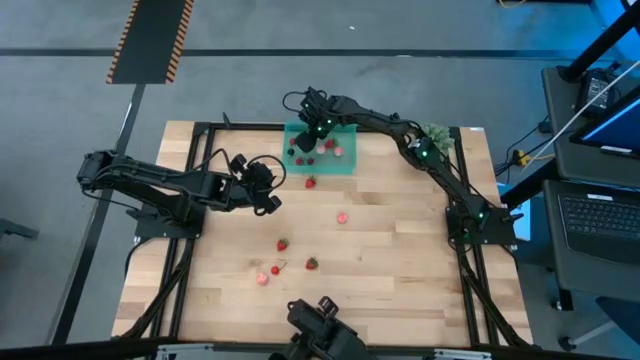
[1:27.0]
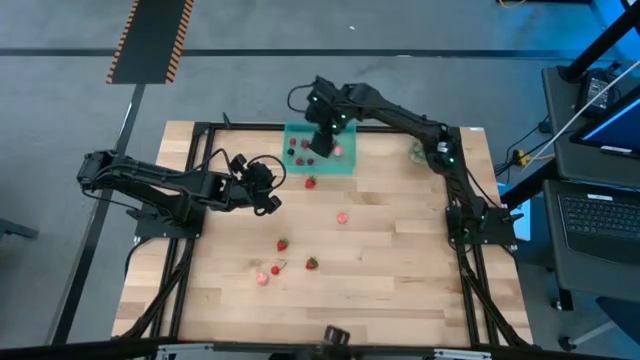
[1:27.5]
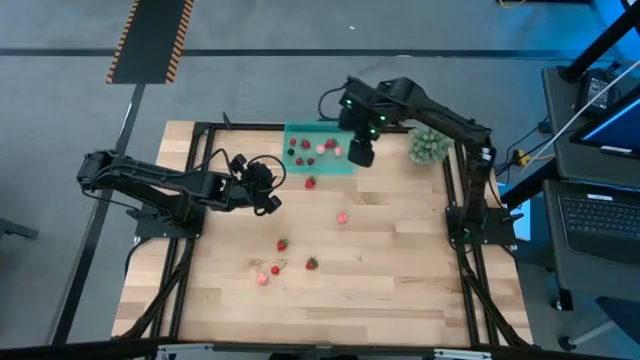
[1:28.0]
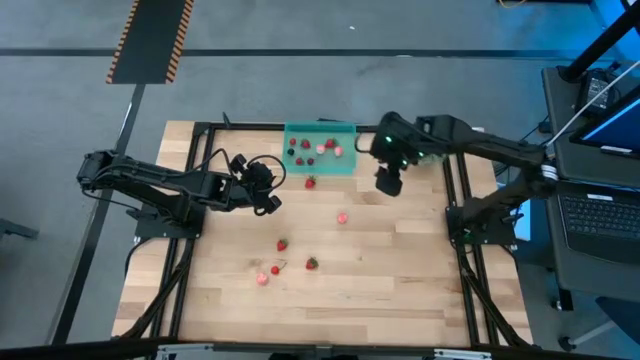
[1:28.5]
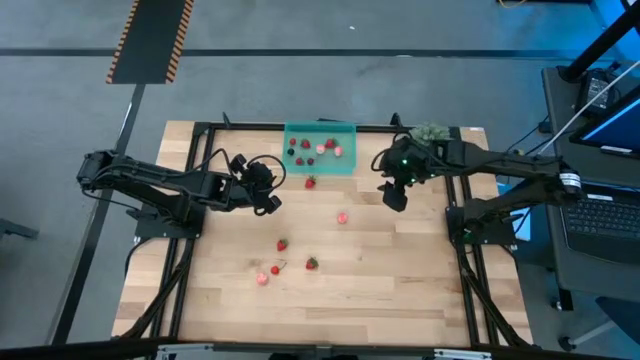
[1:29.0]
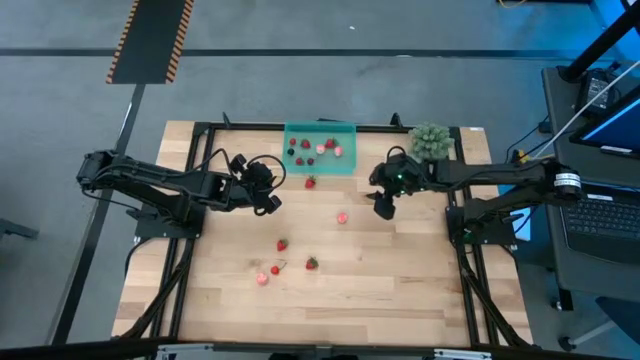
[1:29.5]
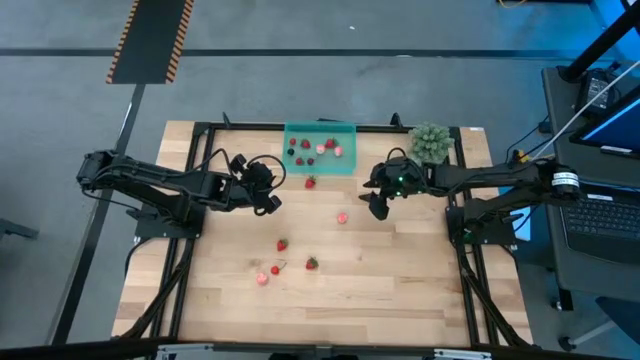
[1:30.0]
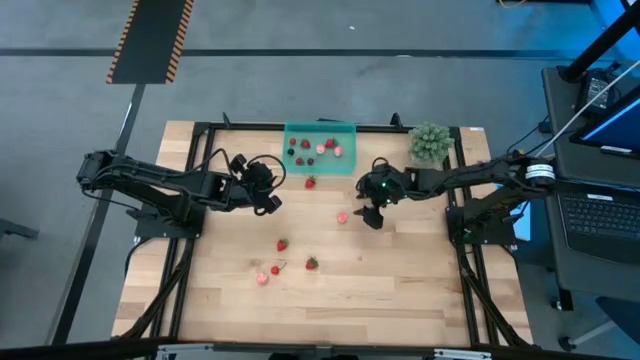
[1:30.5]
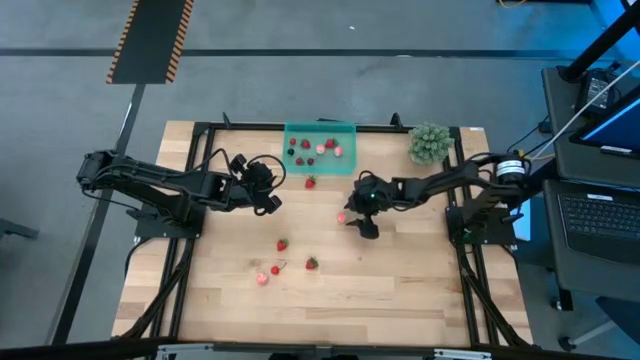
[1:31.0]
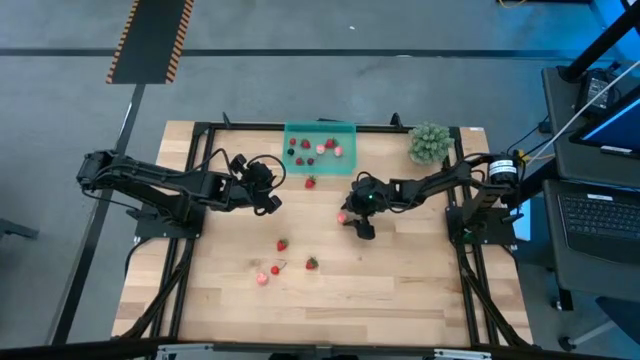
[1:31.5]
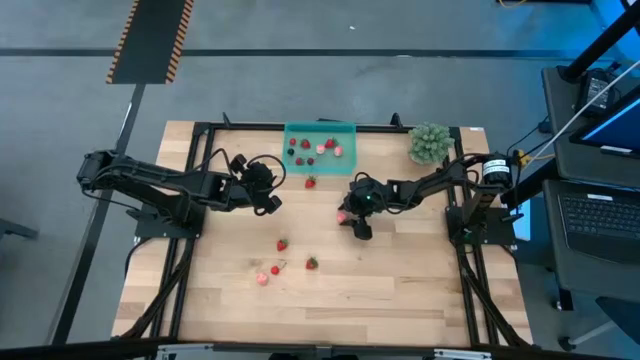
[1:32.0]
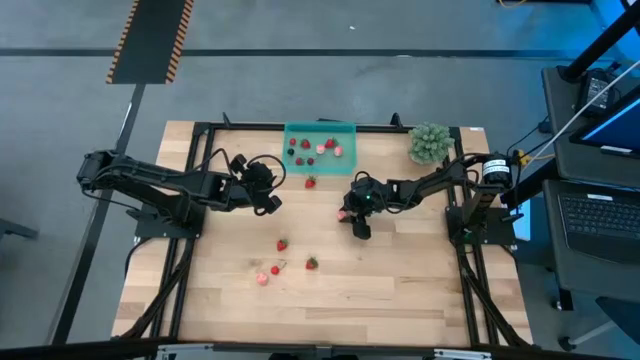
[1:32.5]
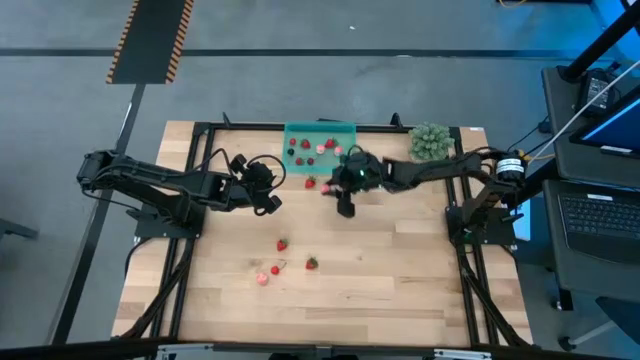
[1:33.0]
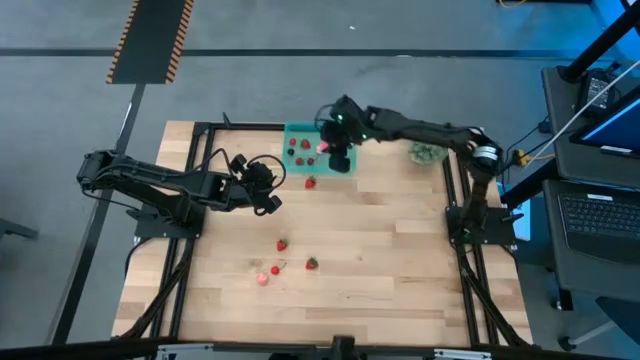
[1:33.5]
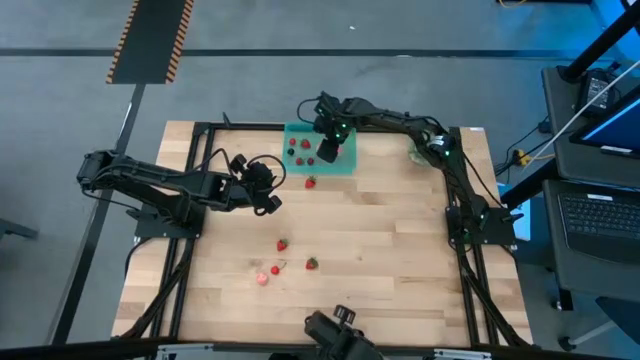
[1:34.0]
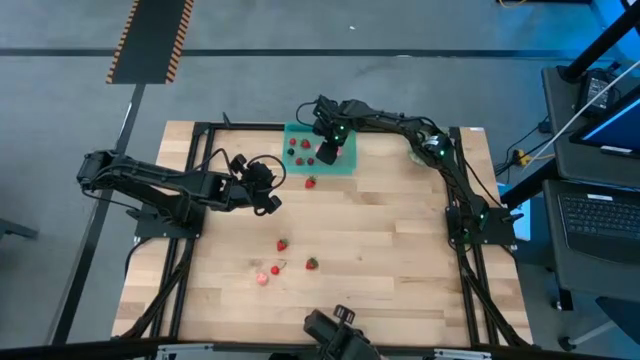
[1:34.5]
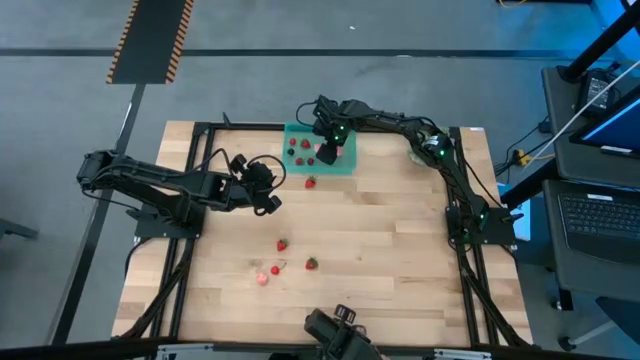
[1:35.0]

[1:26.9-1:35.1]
Task: Pick and placing Produce into tupperware
Put the pink peach into the green container

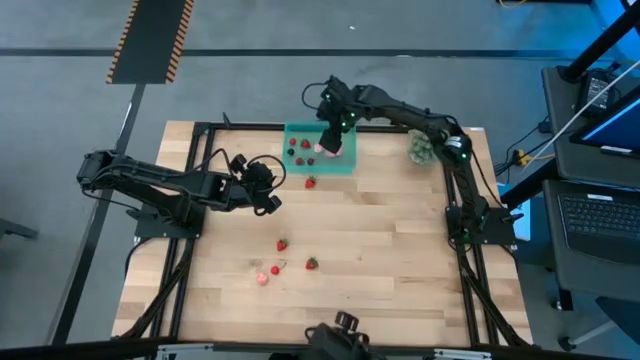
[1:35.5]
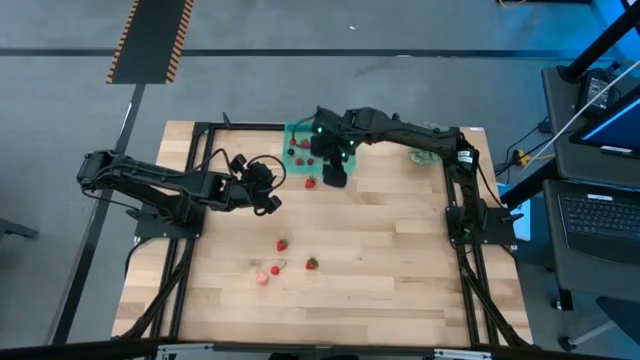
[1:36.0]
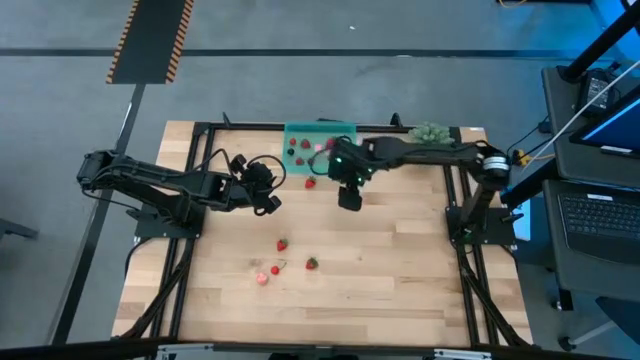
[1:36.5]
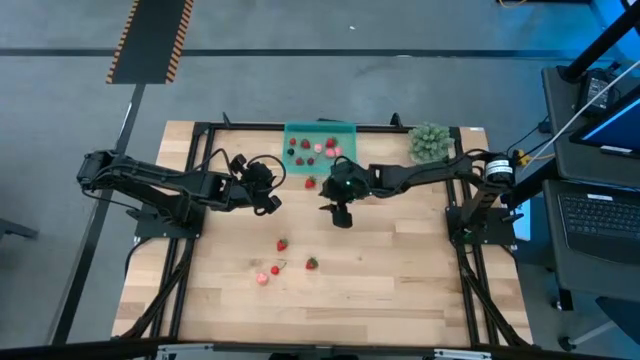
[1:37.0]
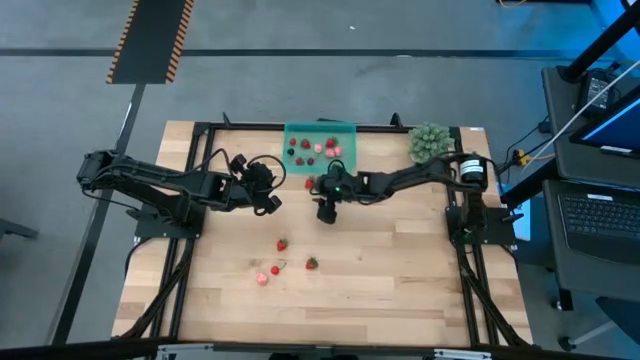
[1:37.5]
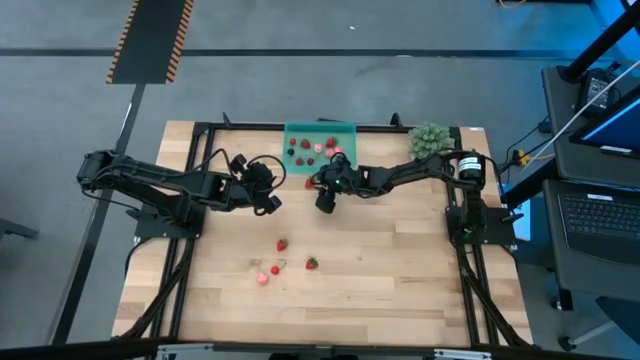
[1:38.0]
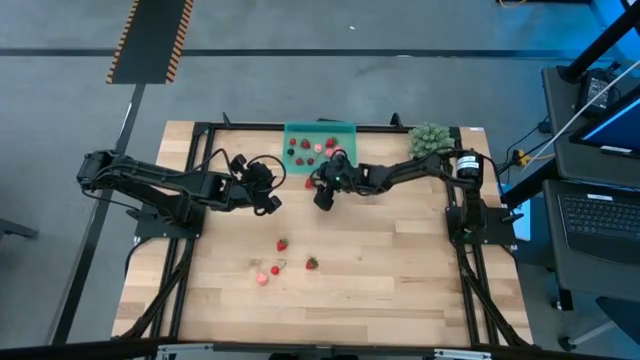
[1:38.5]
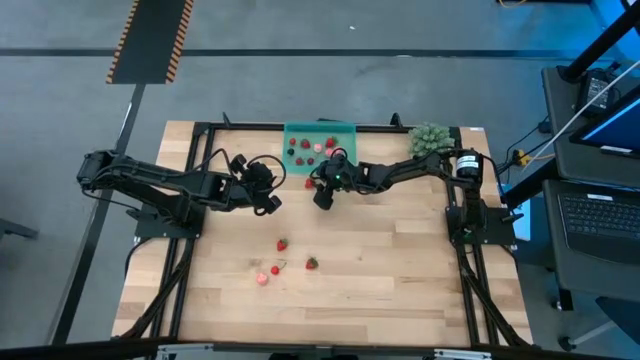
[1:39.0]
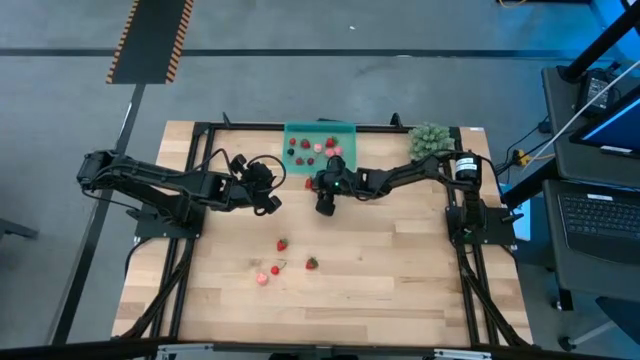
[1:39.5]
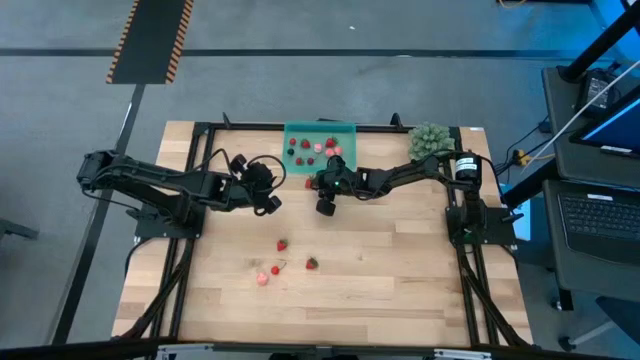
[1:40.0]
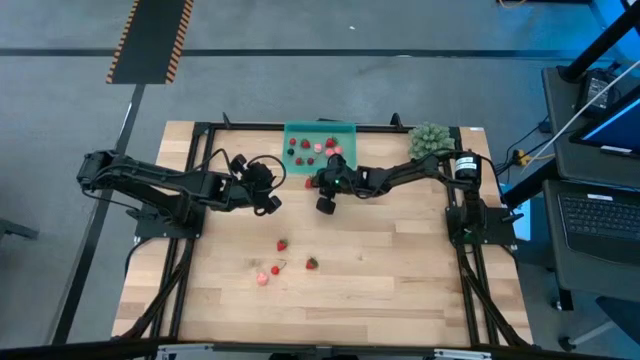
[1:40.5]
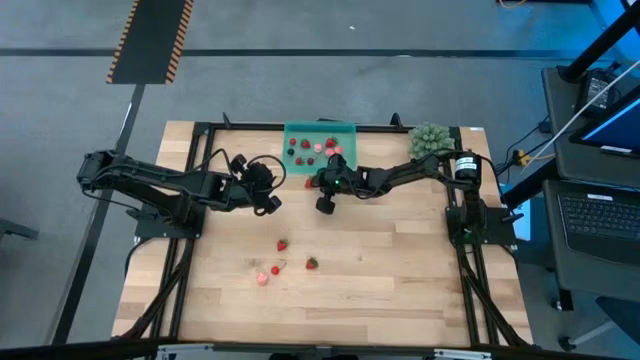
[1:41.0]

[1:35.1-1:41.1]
Put the red strawberry into the green container

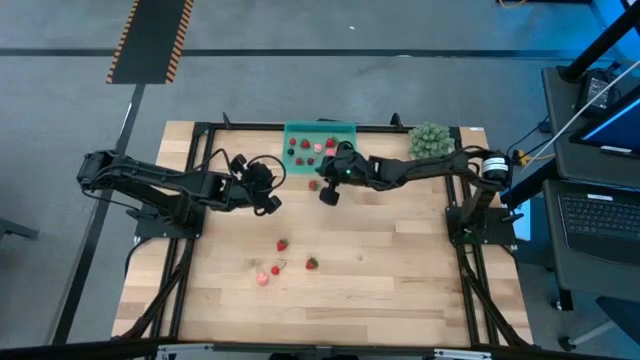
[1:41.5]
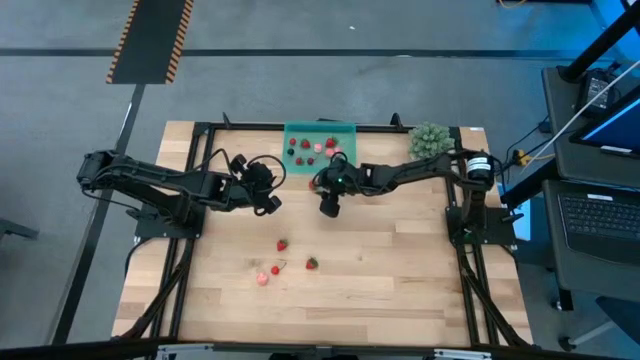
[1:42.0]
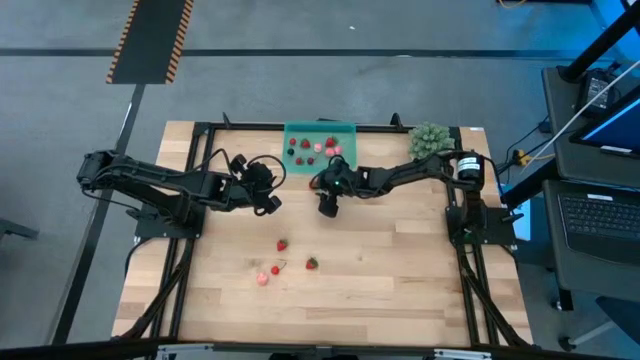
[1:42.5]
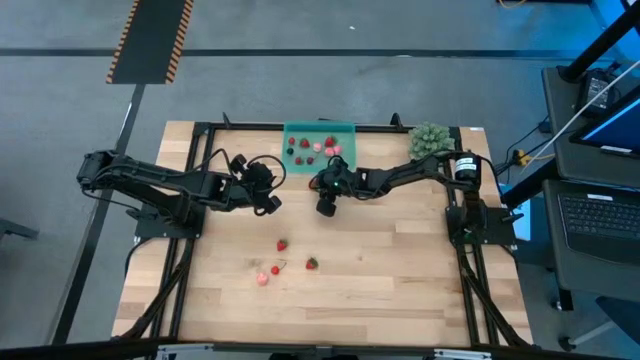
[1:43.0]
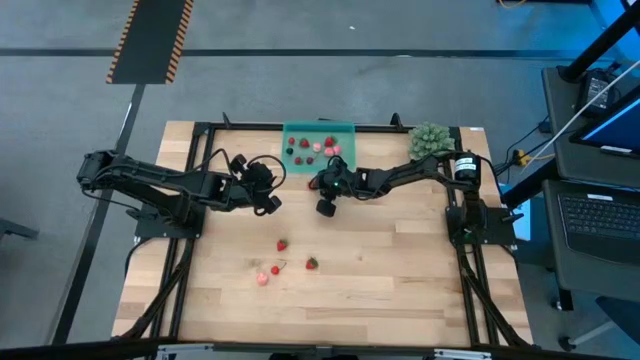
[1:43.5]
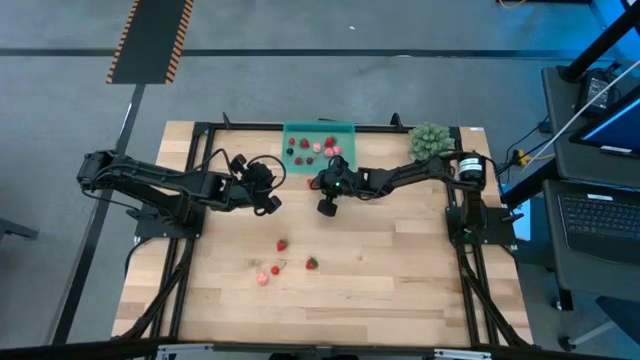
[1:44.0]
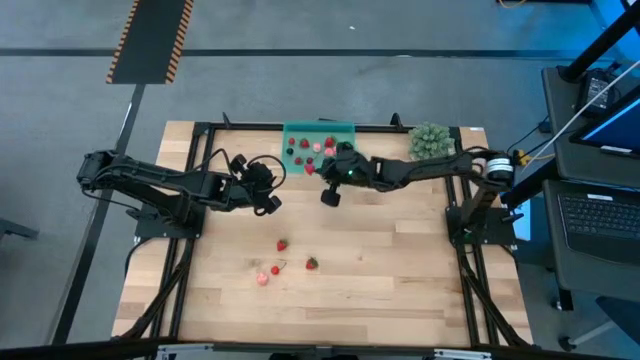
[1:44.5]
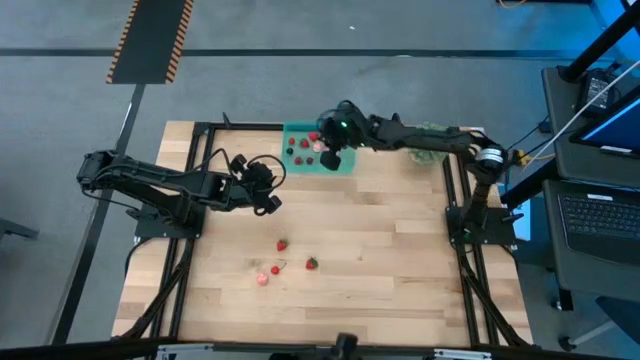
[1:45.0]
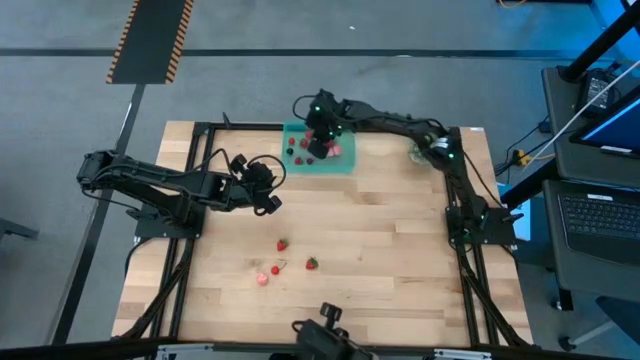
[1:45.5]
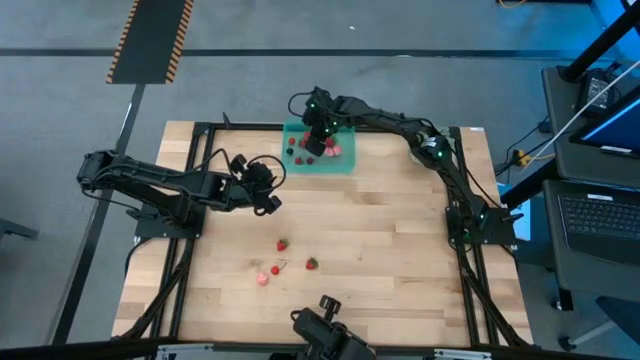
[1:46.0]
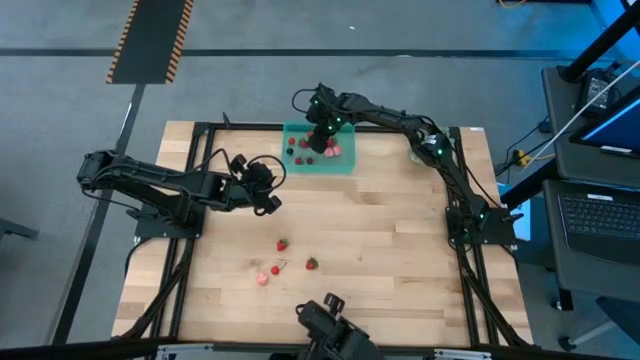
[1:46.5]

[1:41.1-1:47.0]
Put the red strawberry into the green container

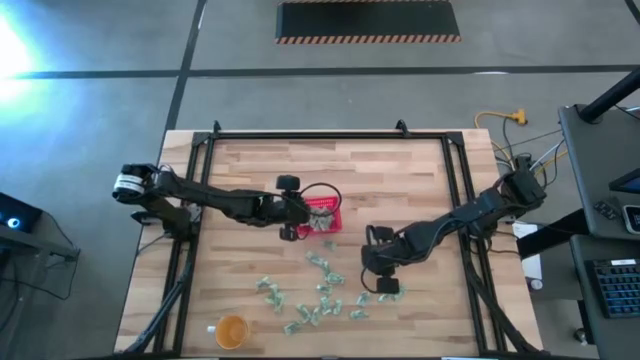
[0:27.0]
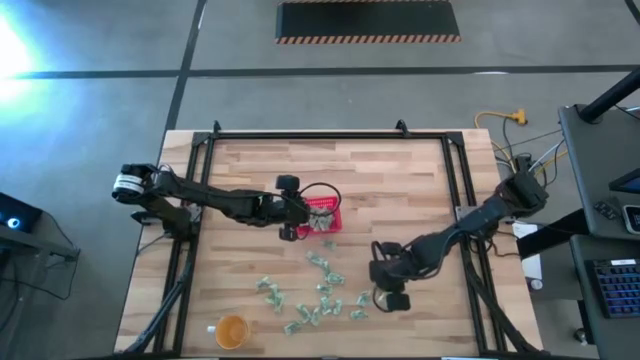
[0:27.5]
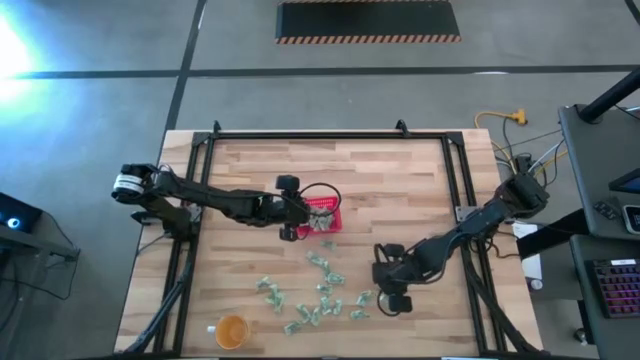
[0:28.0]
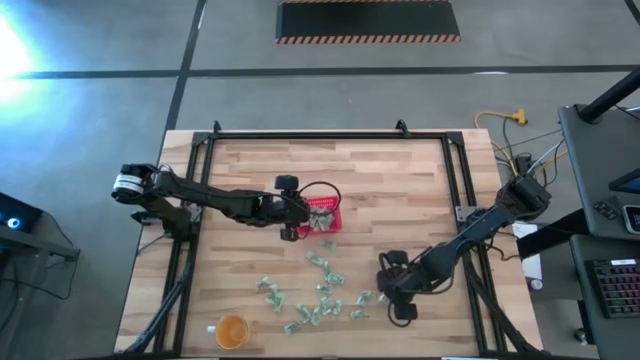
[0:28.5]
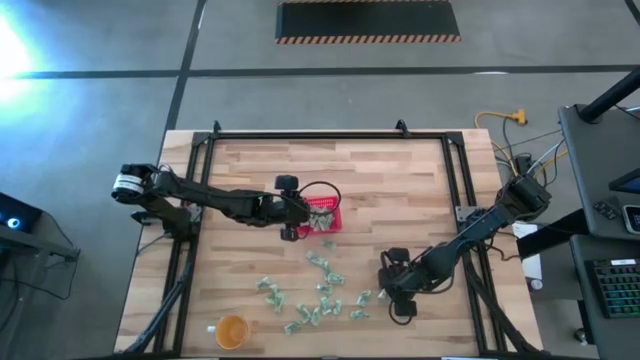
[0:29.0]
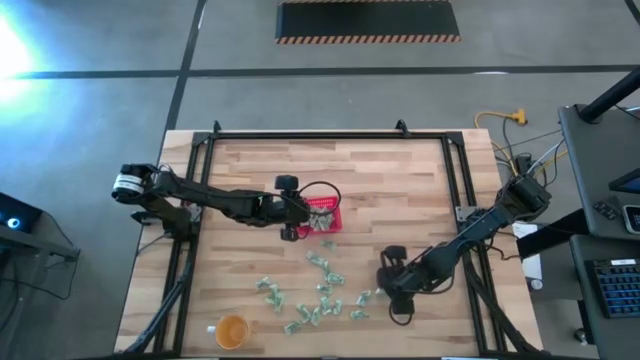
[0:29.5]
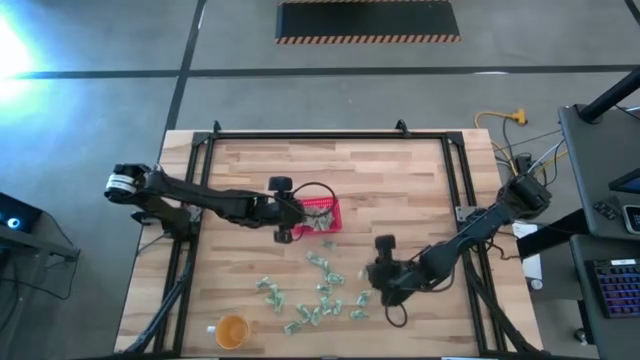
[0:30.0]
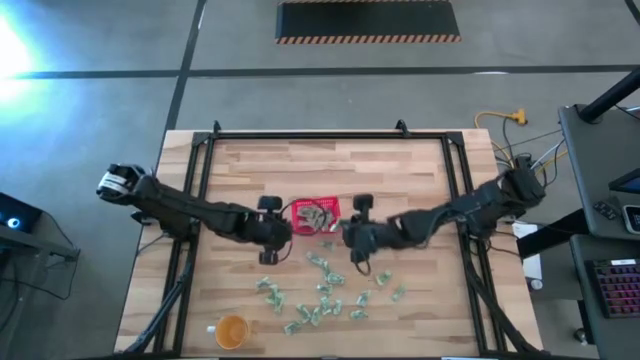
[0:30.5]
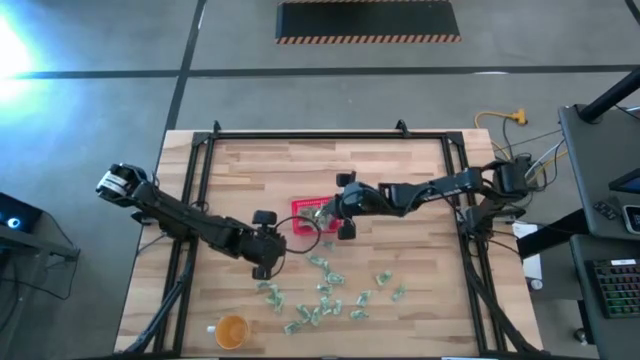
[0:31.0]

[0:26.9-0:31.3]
Task: Pick and place items into bin
Put the stevia packet into the red bin
